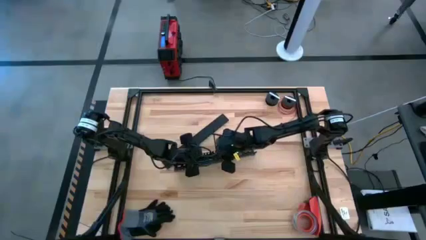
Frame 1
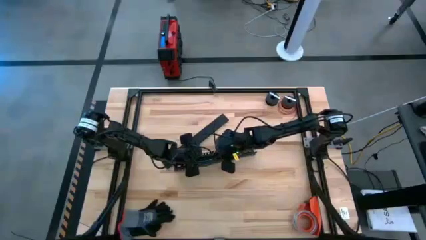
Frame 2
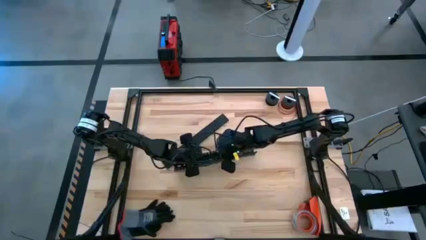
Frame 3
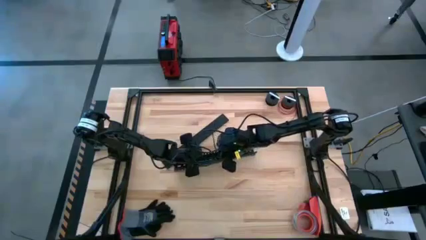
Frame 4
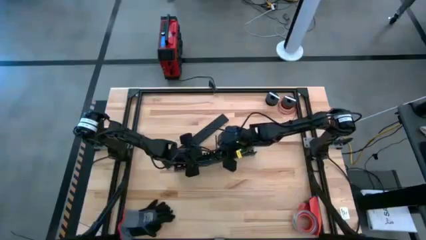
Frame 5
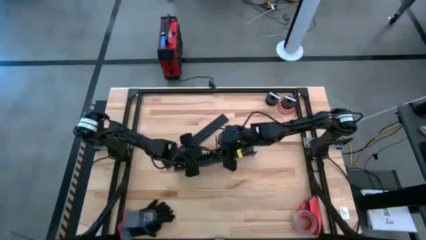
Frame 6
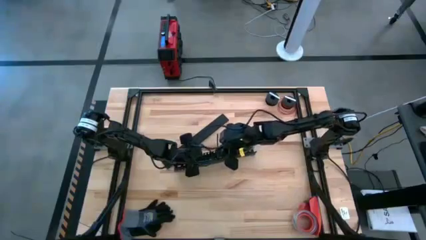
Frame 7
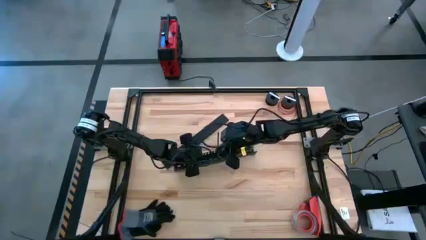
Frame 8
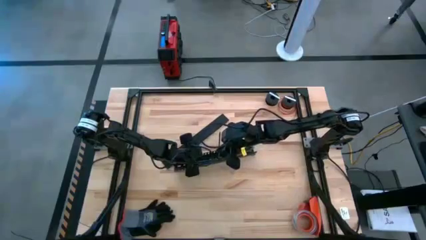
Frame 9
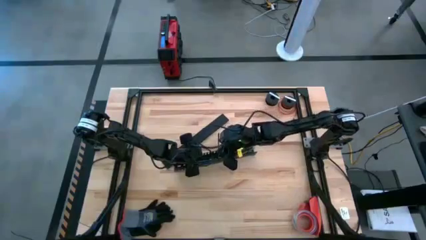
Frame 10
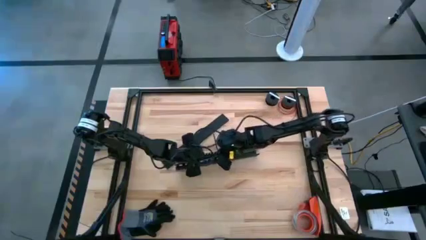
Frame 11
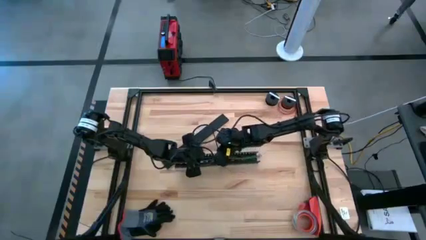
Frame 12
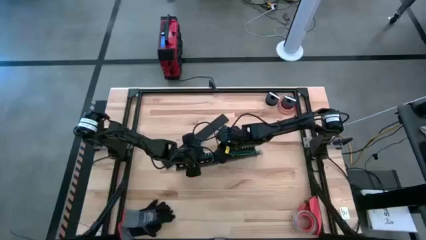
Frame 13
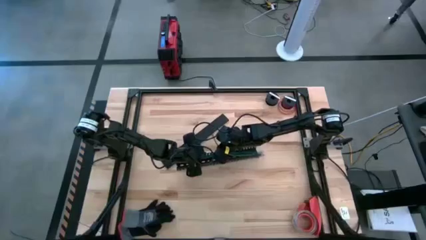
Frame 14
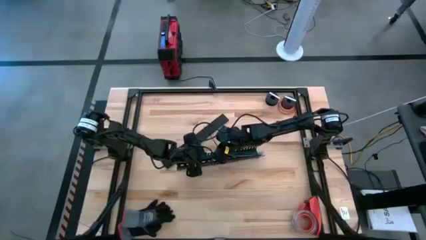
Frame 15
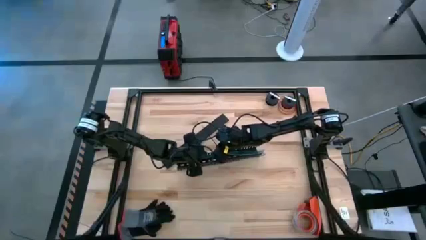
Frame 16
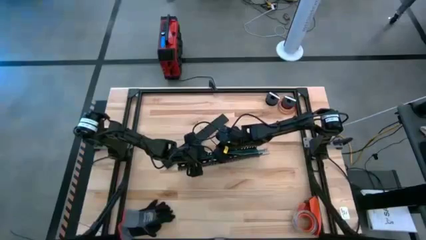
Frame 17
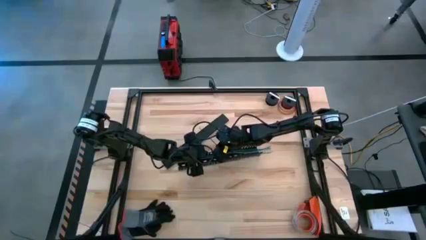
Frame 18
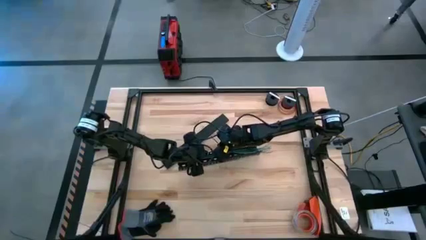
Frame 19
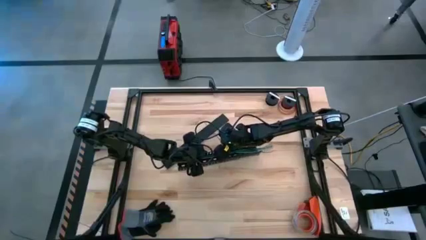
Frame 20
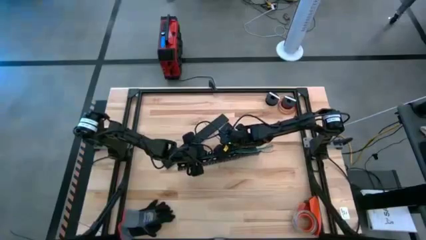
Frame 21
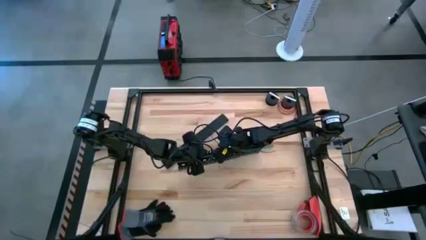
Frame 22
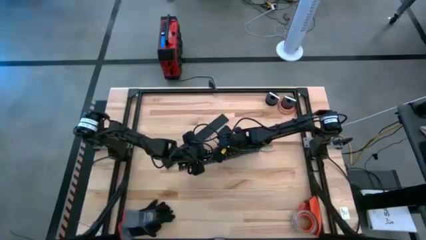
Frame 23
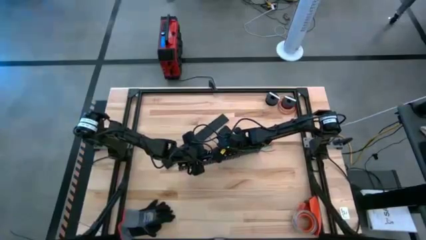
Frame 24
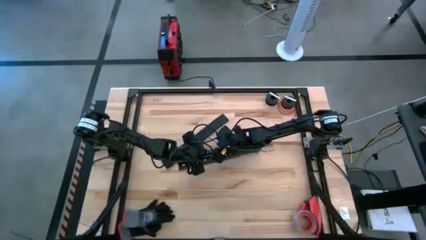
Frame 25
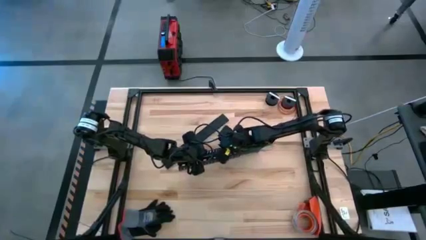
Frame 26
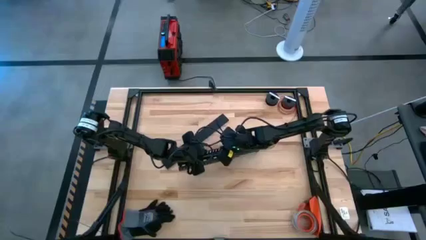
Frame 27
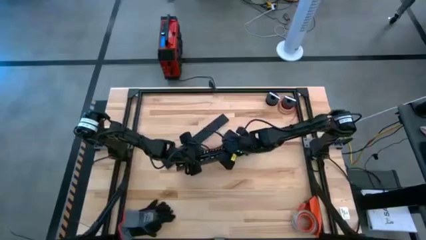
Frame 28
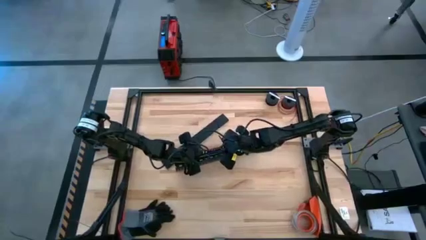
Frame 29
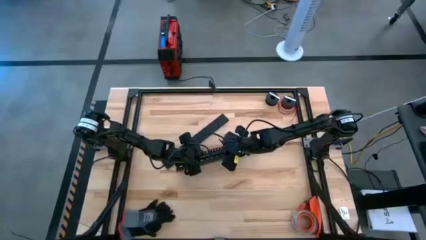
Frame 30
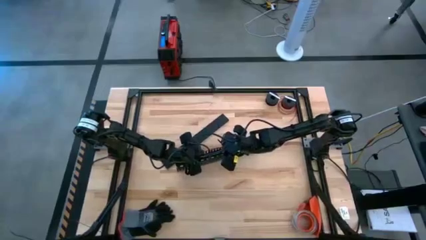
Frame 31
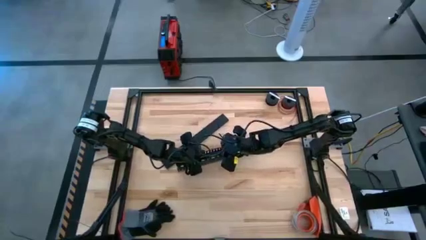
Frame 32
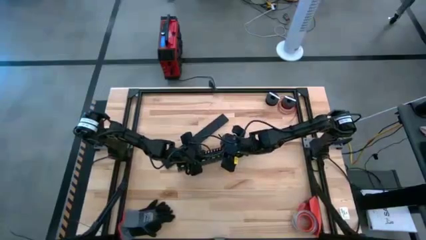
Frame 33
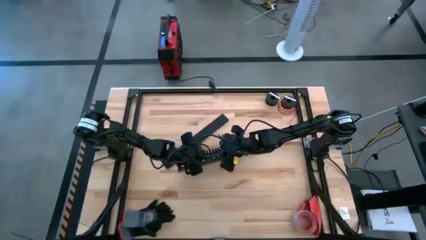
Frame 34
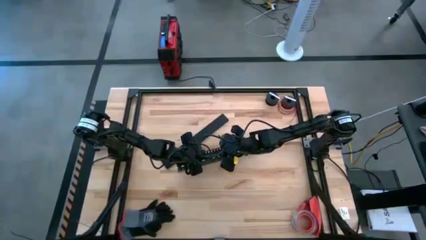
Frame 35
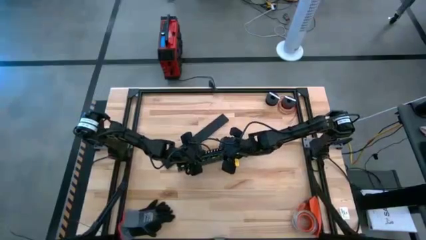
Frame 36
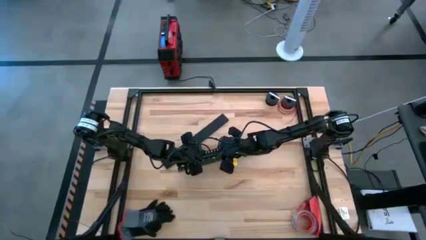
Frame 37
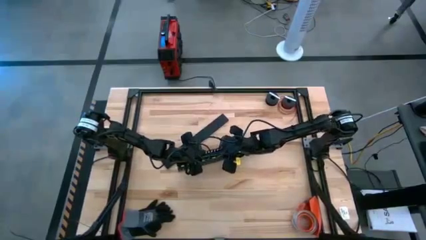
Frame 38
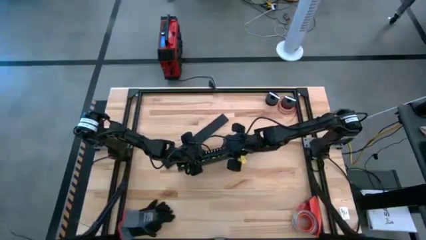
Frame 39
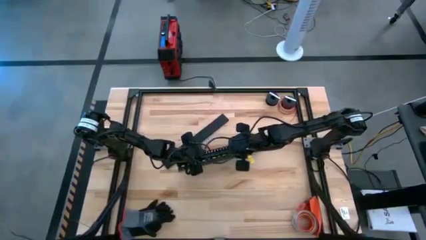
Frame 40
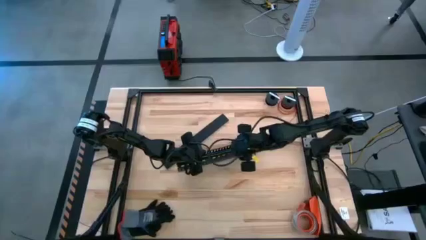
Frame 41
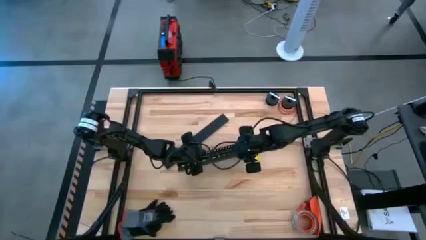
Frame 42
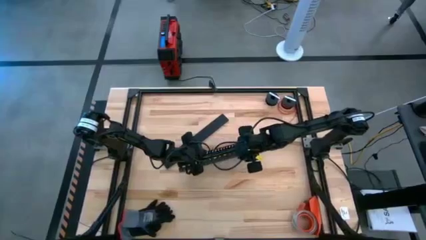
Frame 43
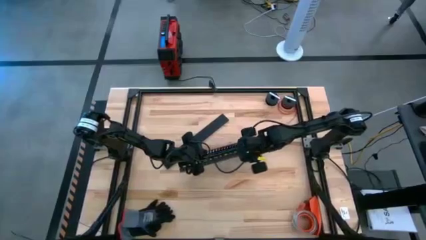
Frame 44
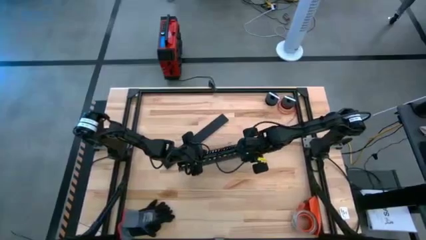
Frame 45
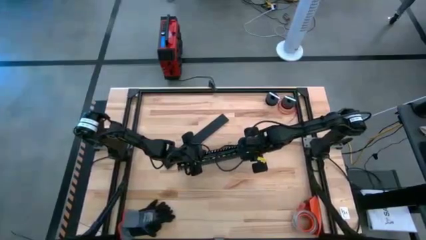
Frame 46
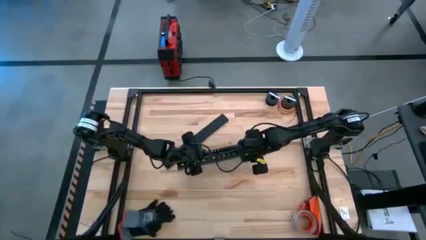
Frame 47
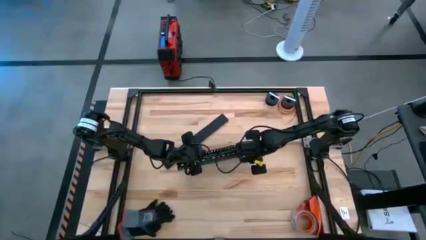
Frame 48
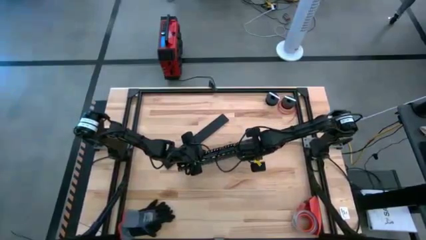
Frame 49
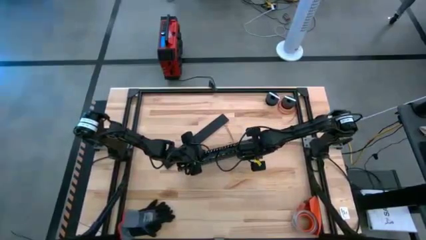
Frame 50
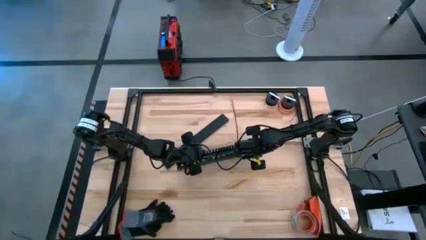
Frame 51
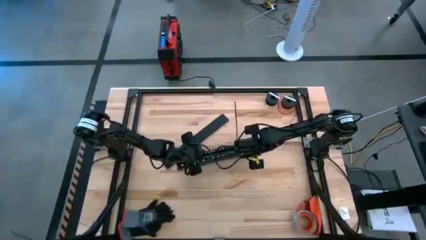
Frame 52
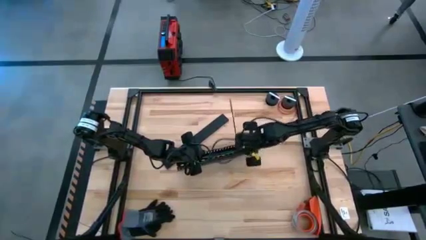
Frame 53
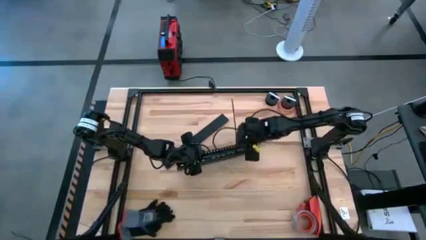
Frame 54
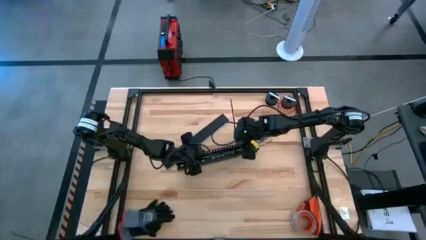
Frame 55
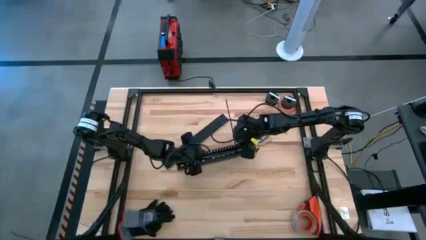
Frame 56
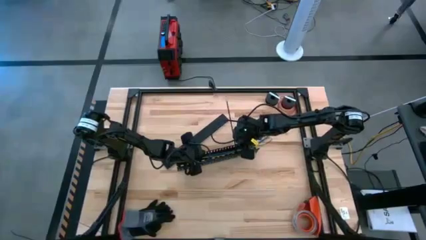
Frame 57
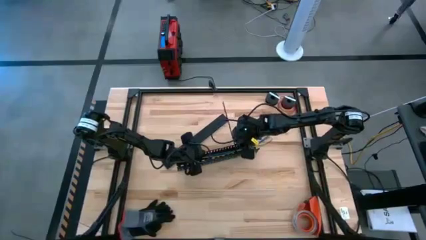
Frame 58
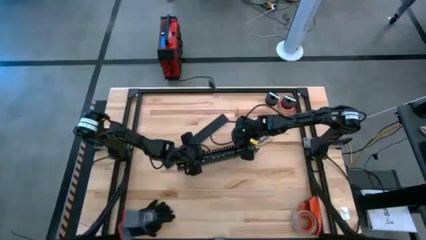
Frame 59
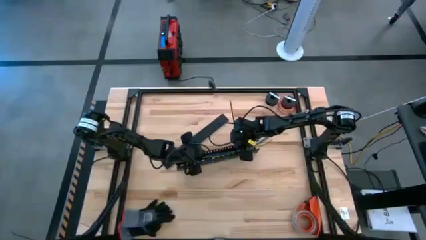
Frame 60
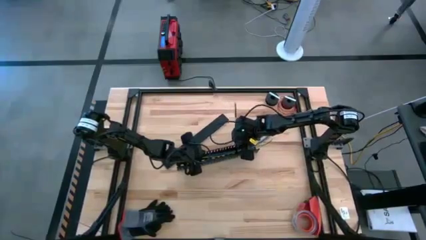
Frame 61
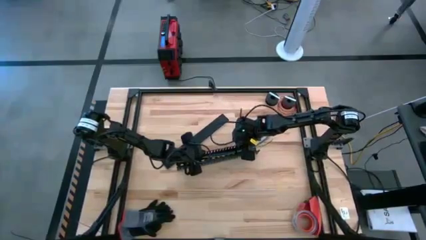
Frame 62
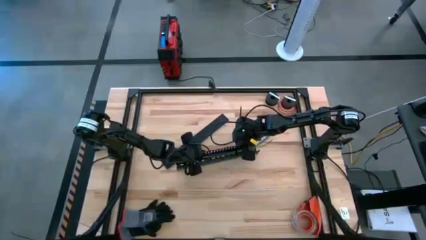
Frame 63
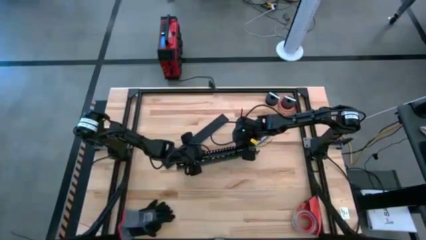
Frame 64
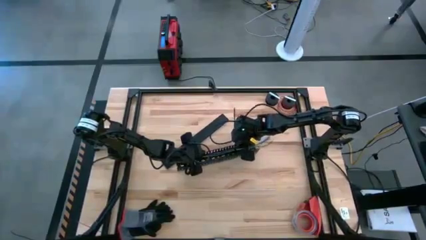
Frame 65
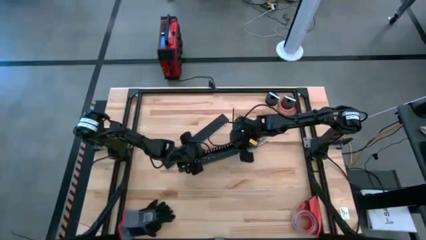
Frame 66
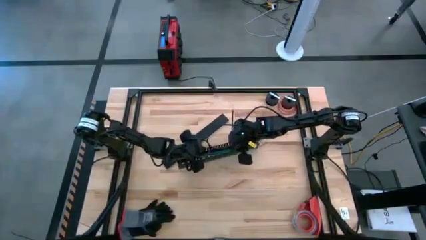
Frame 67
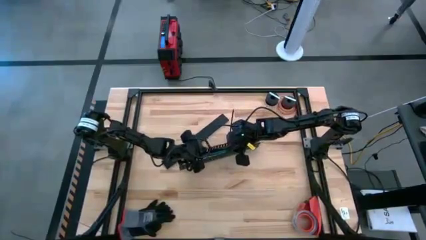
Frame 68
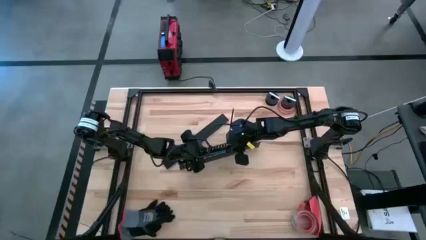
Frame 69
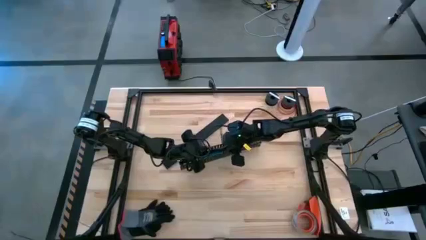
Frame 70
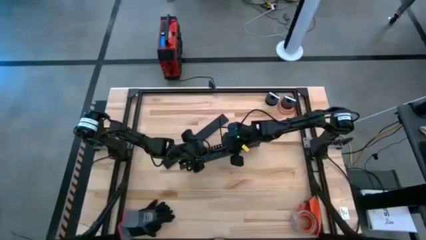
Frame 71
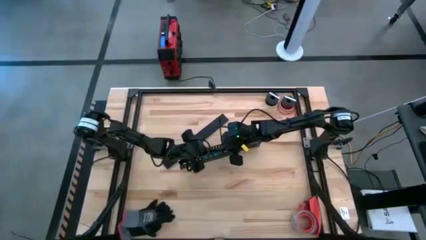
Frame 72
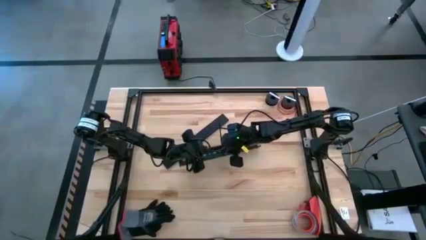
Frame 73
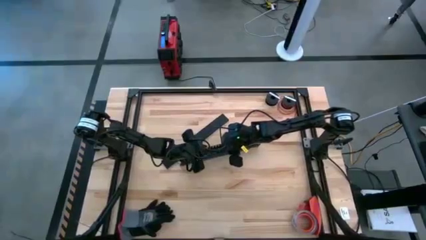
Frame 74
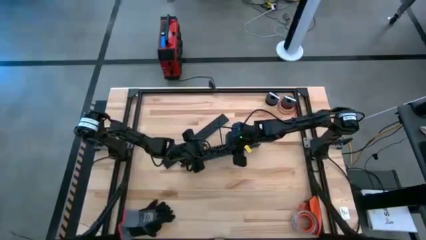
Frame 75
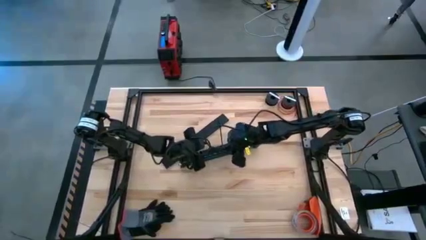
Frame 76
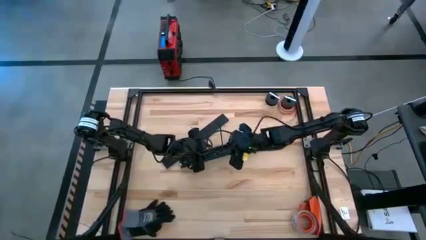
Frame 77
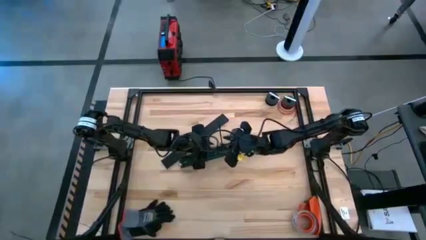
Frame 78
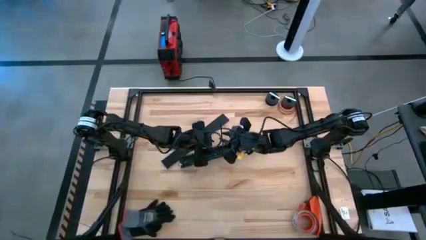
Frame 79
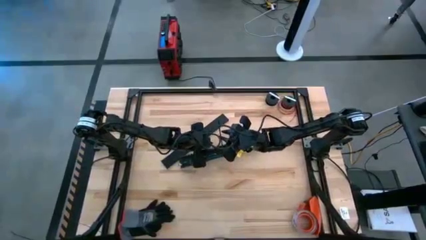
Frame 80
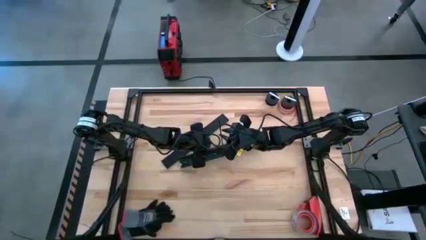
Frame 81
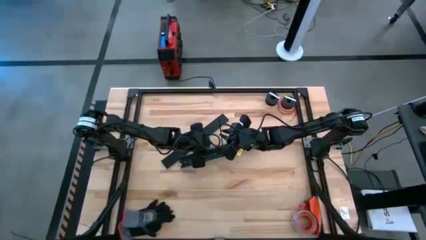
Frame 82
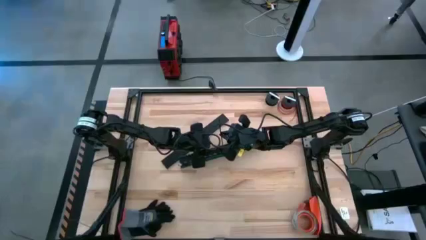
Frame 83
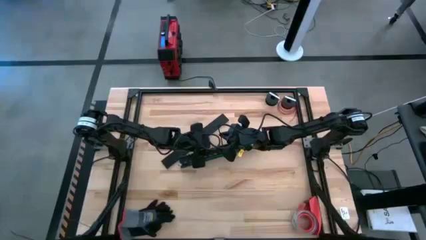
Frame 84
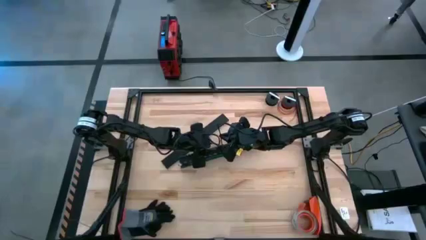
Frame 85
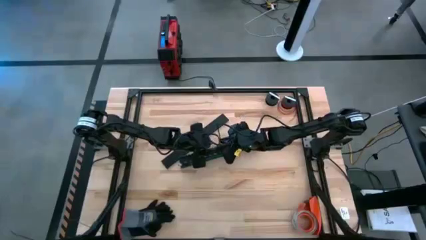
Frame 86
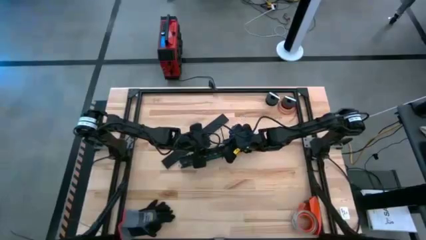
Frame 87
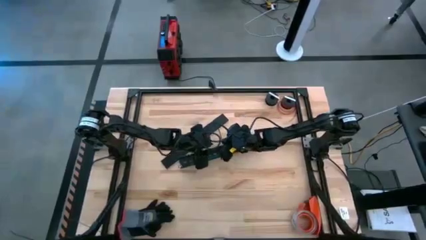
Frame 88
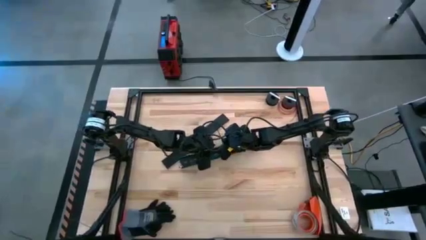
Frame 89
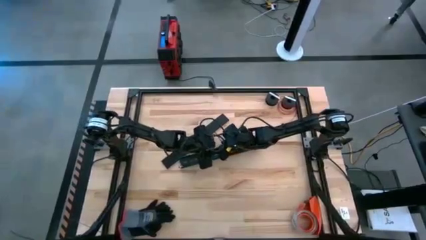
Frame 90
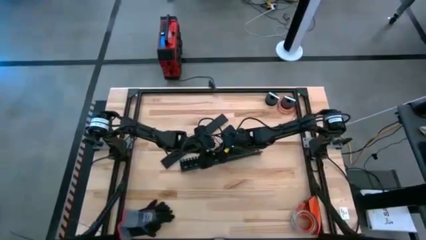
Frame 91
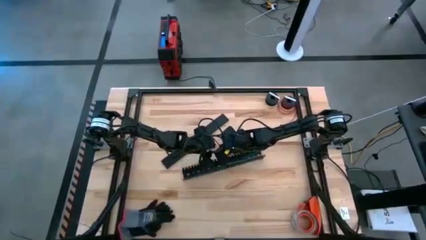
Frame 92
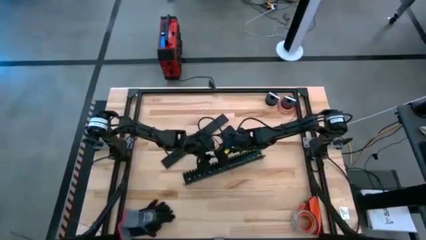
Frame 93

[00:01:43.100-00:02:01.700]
Task: Ziptie cables
Put the ziptied cable wires in a black cable duct
